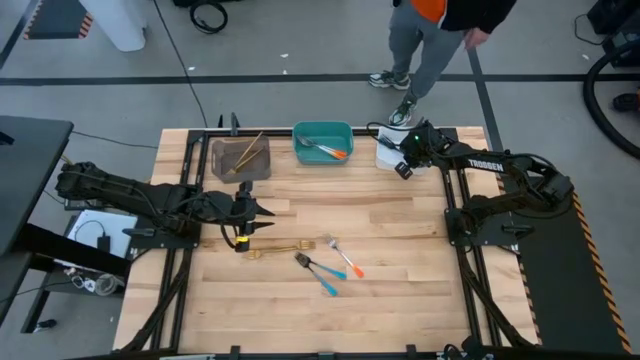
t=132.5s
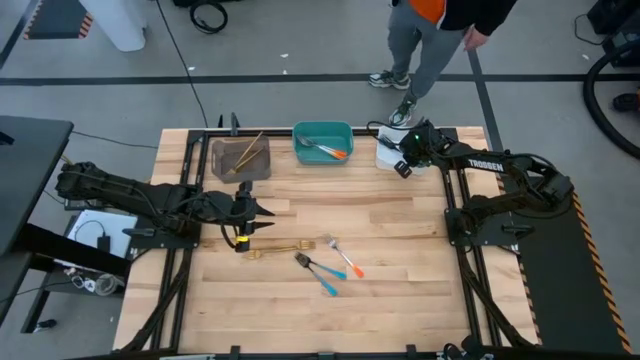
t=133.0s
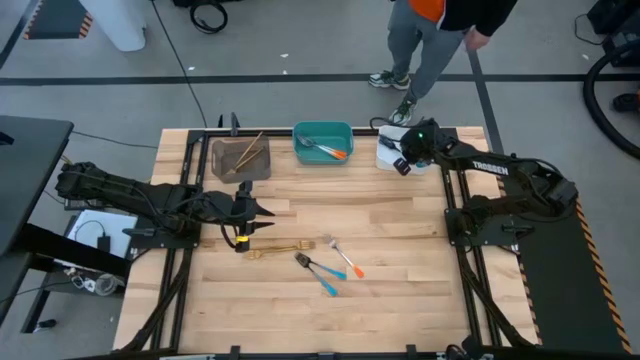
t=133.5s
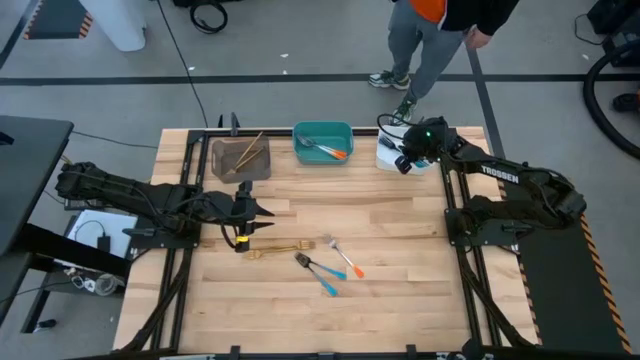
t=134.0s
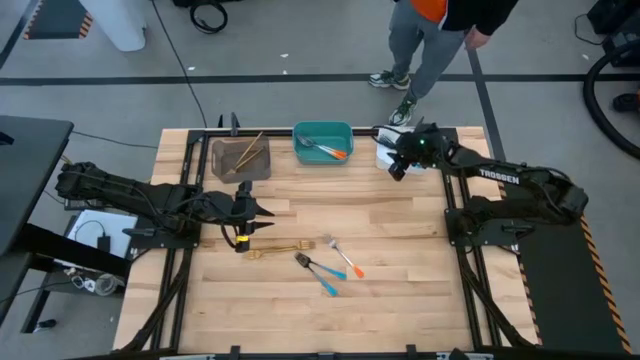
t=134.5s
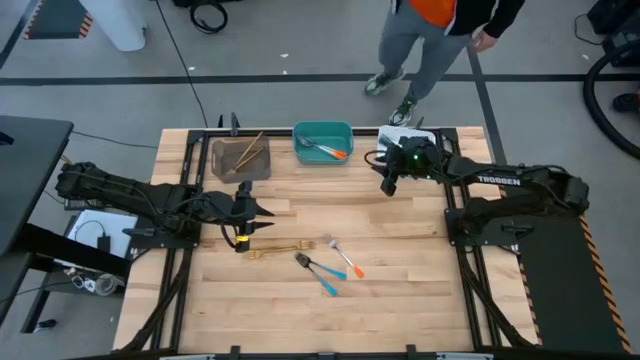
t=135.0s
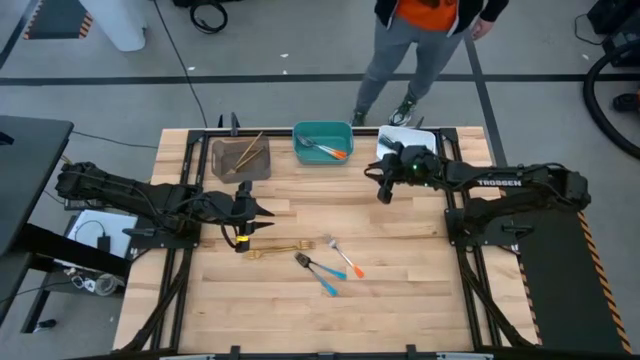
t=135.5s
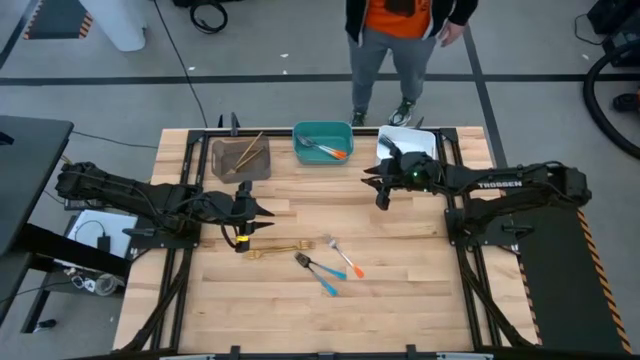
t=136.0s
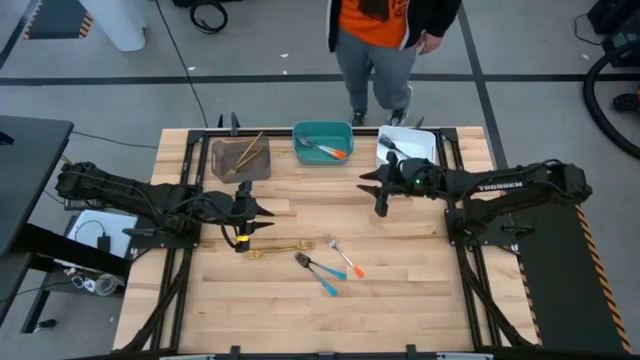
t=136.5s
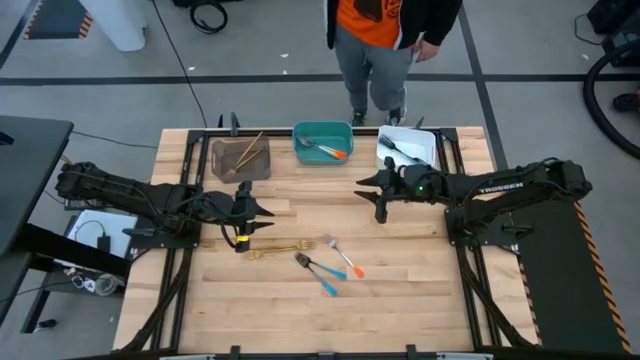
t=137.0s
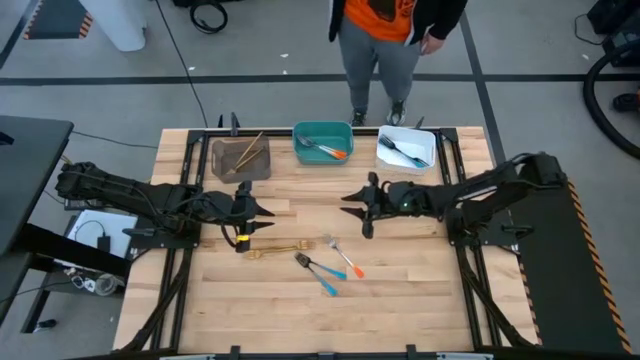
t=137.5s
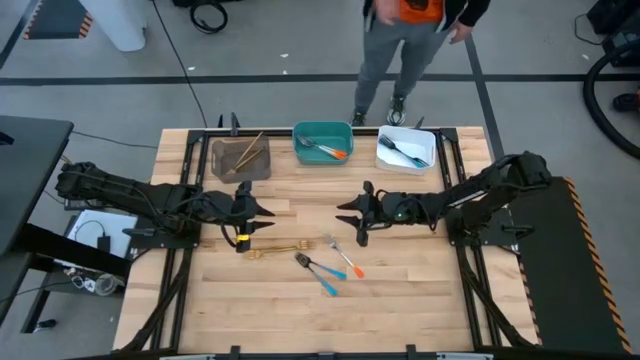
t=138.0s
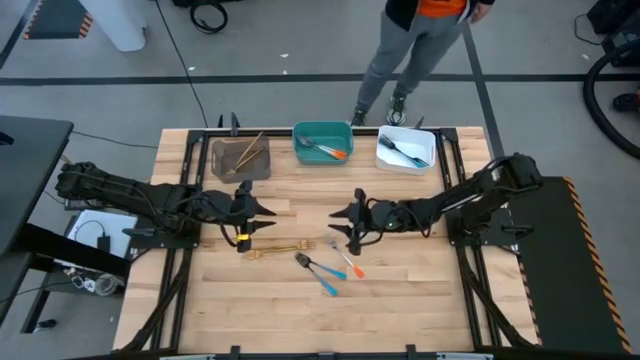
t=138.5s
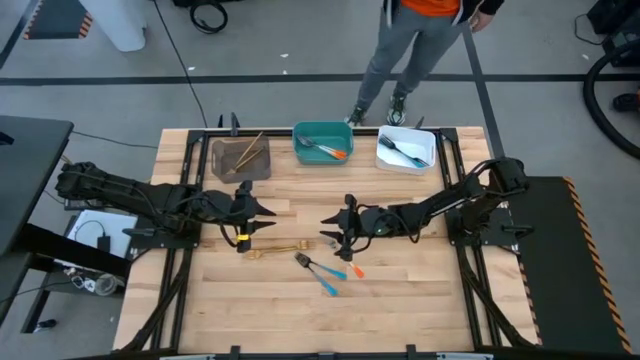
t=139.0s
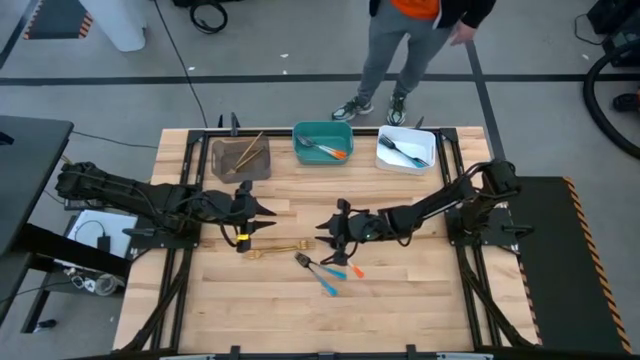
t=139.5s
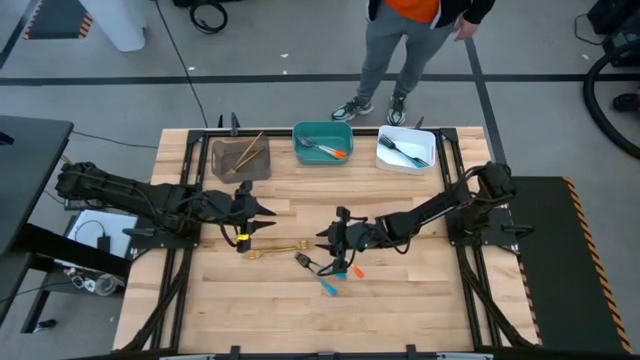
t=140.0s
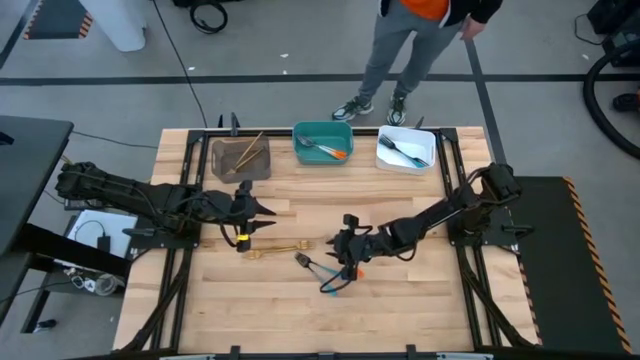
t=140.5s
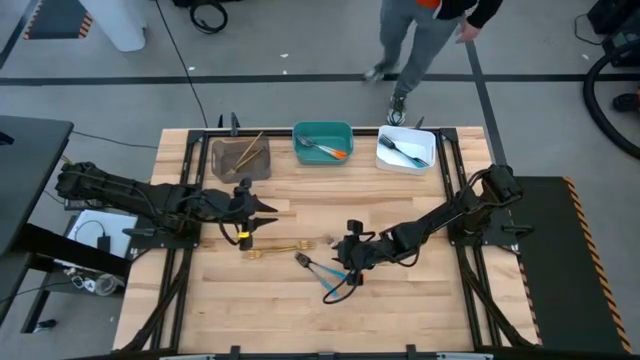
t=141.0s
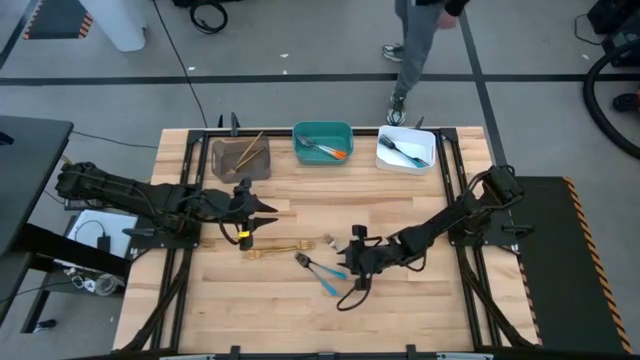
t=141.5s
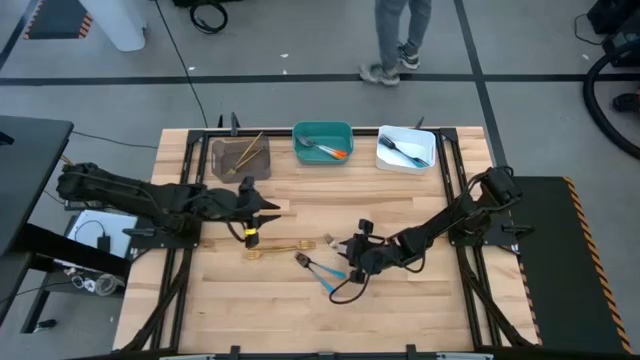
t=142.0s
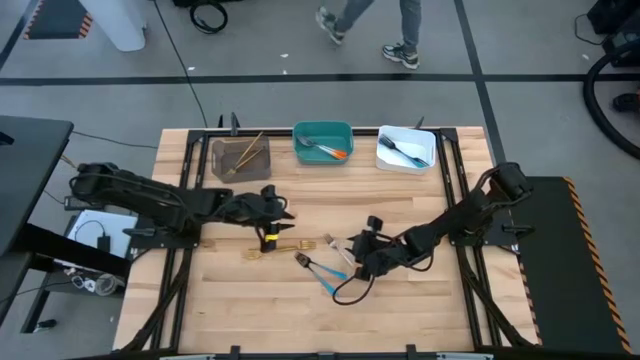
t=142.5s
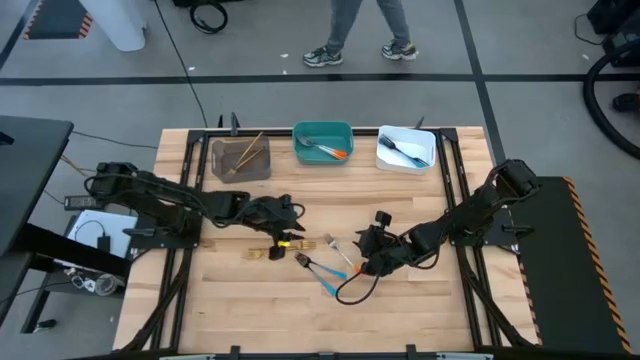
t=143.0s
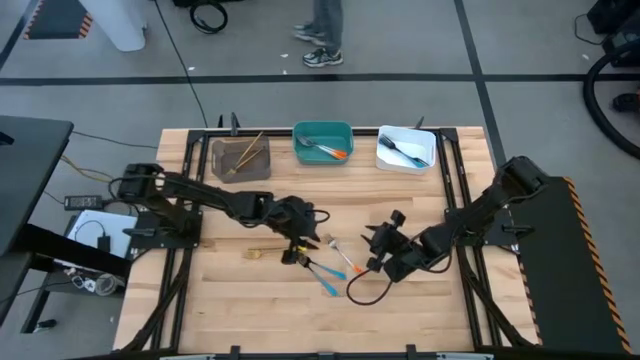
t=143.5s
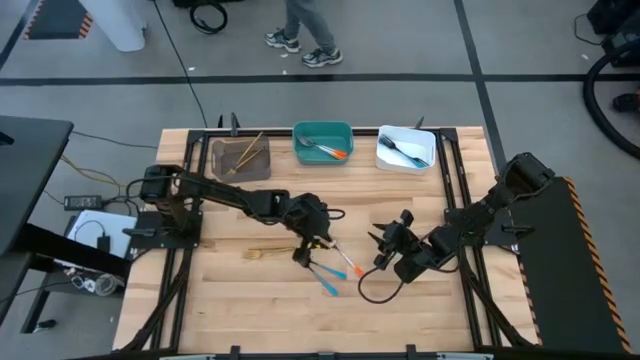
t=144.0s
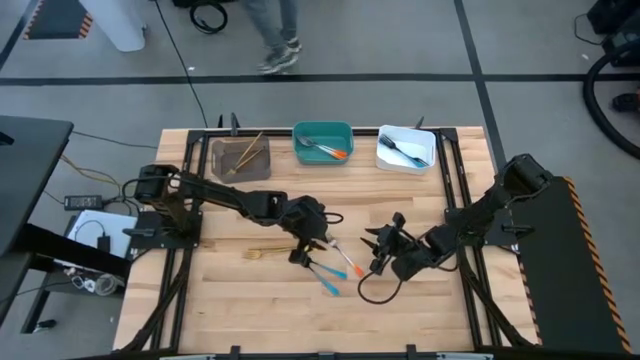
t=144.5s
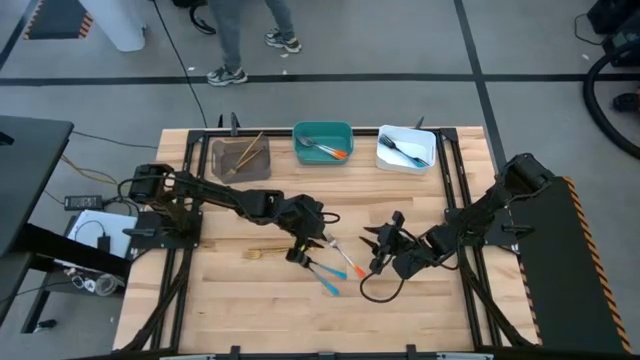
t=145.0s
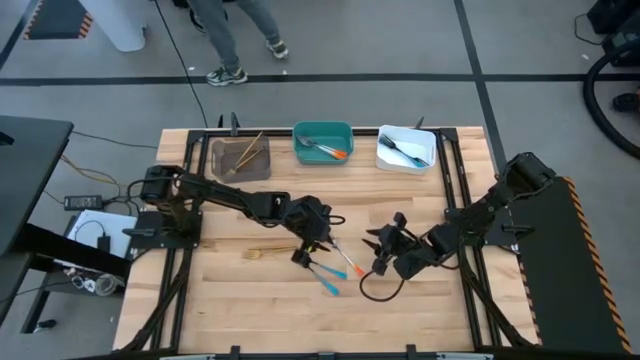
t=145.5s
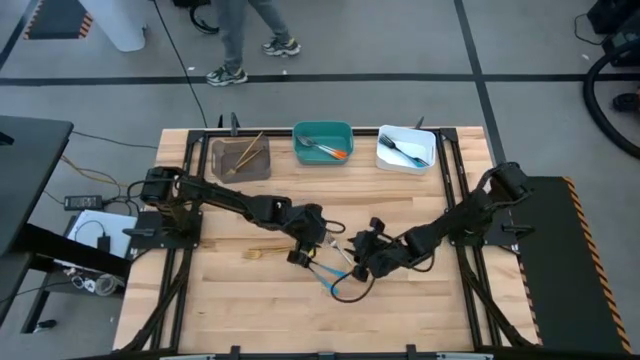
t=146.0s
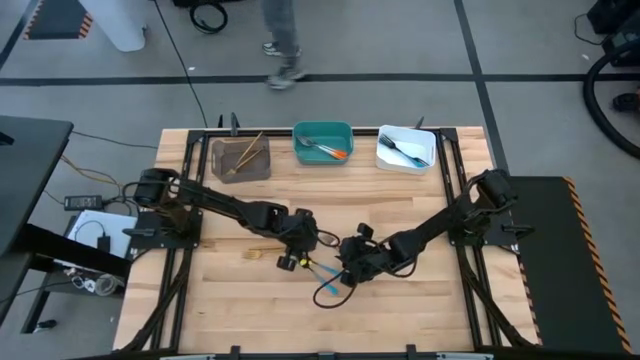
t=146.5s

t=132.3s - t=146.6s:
Task: Sort silverware by color (type)
Put the orange fork into the blue bin

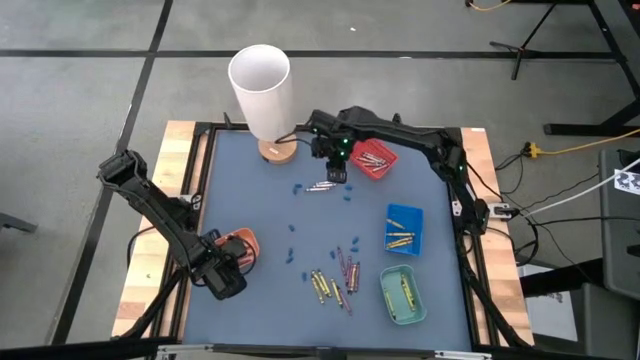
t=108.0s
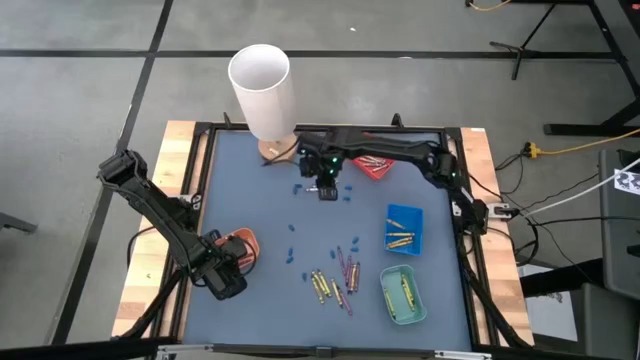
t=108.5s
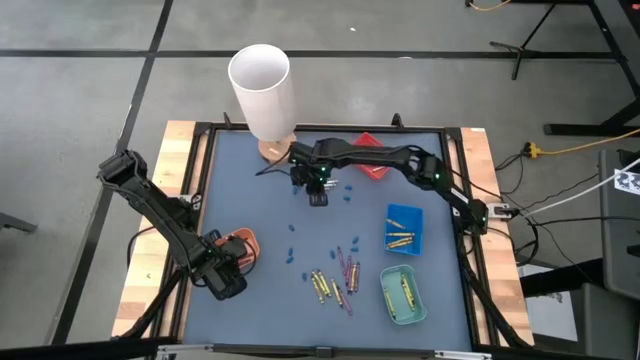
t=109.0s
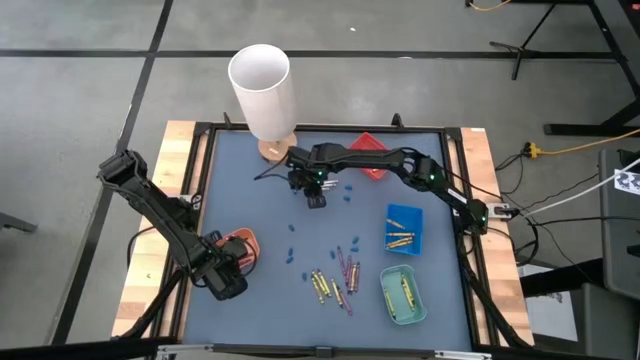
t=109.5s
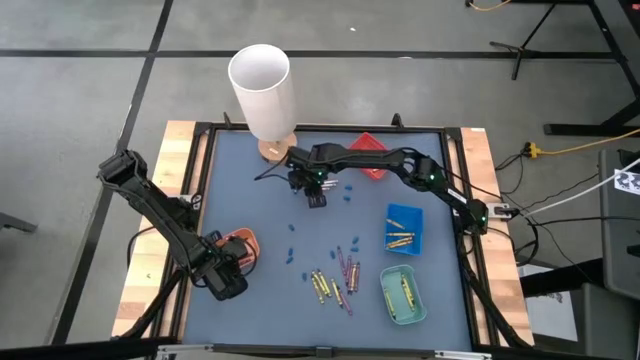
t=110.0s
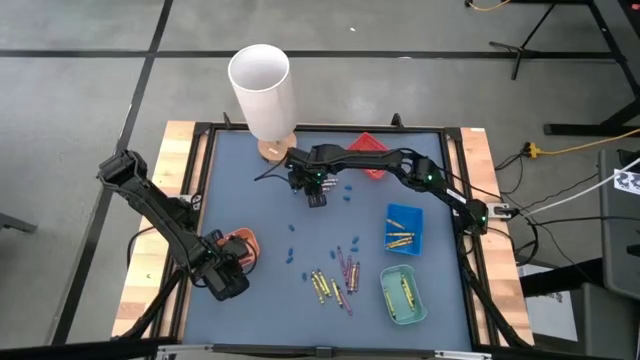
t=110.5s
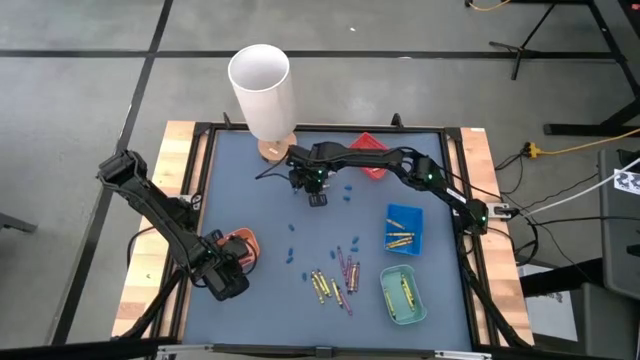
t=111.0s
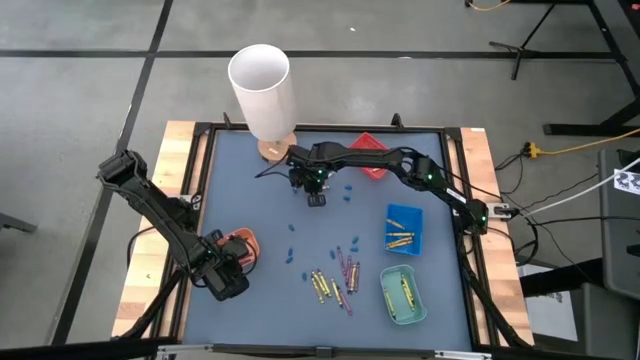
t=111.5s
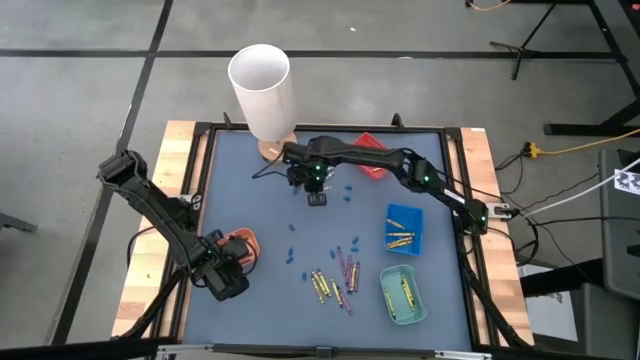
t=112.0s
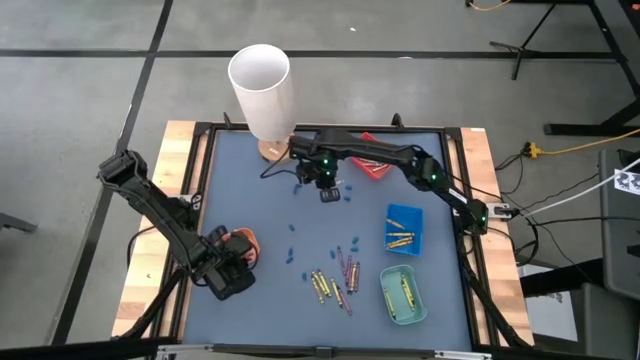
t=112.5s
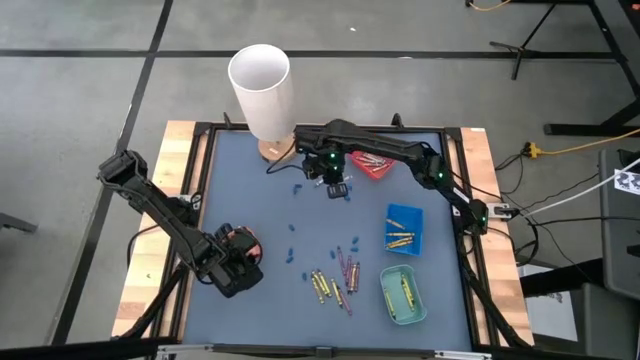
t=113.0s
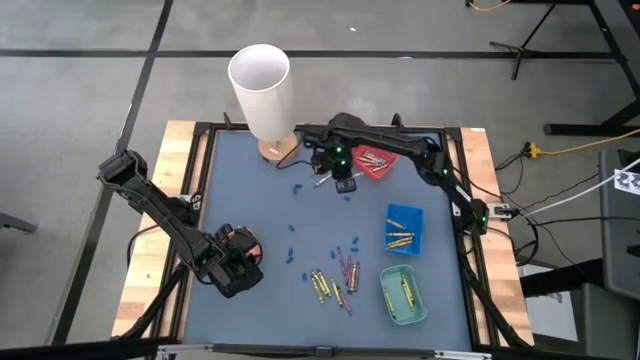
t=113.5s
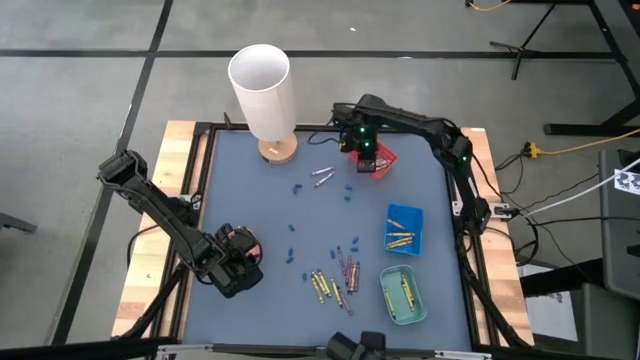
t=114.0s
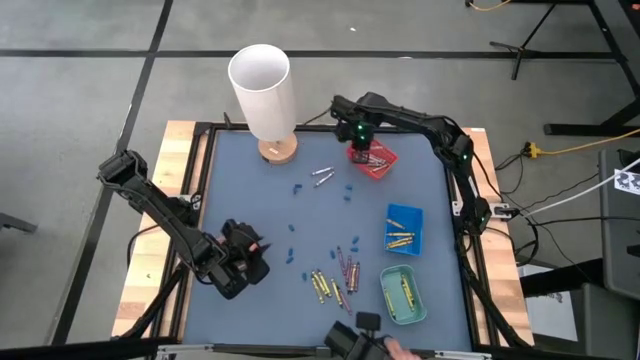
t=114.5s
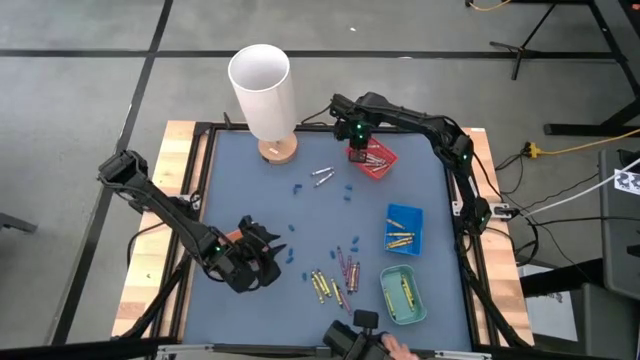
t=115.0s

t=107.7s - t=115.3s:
Task: Sort crayons
Put the grey crayon into the red bin
